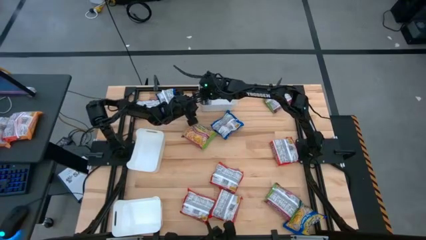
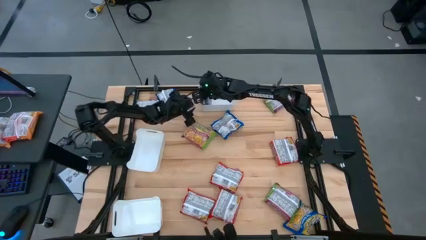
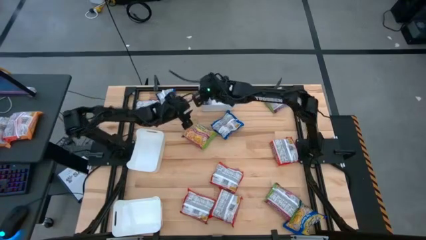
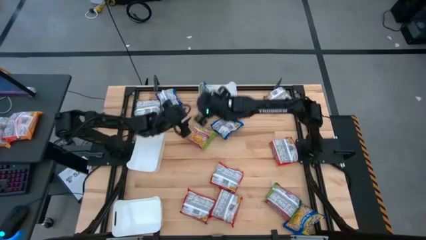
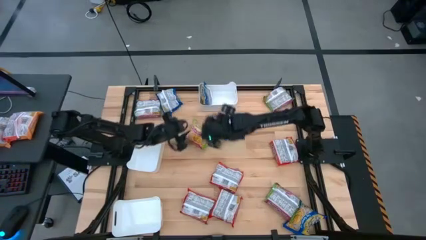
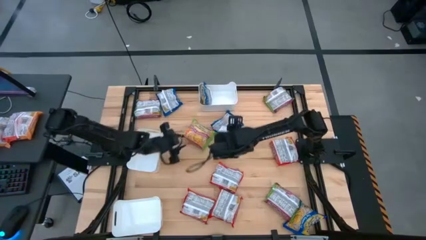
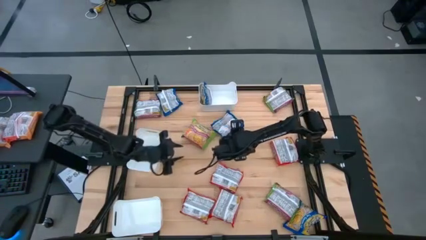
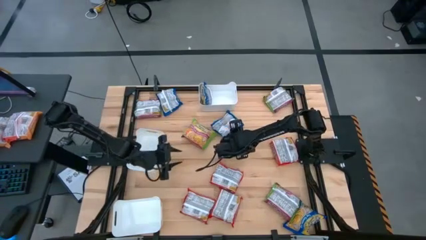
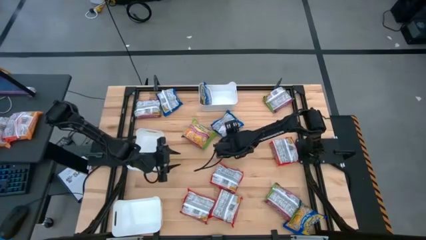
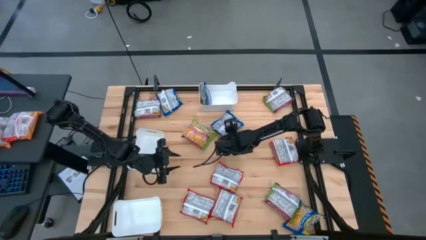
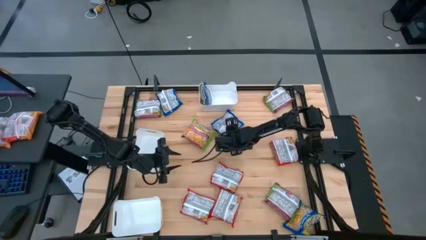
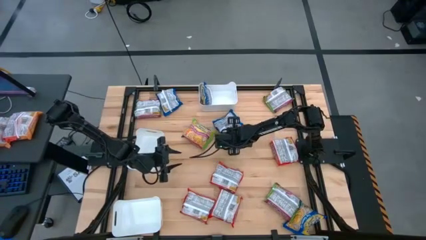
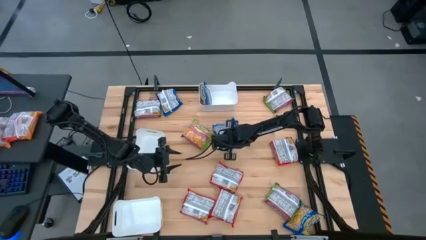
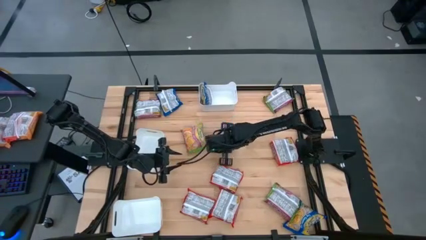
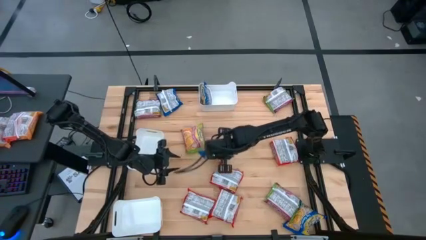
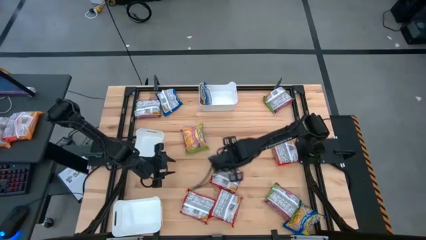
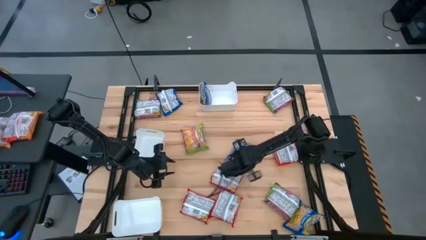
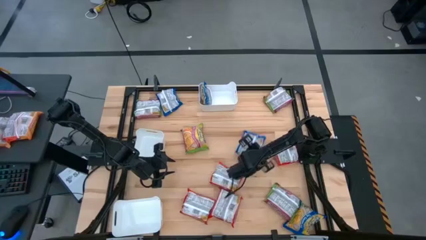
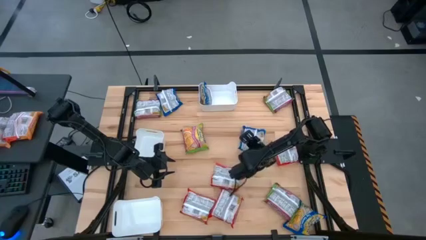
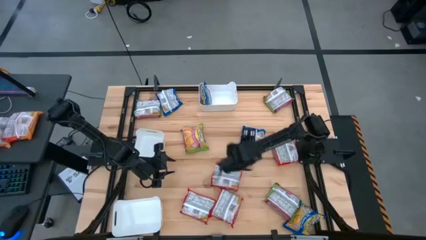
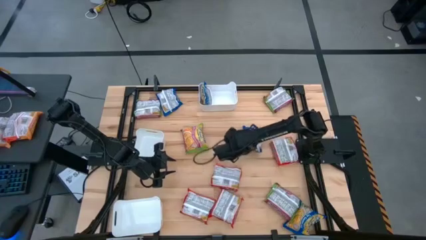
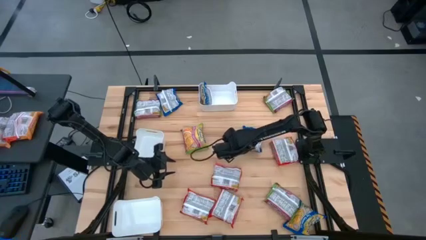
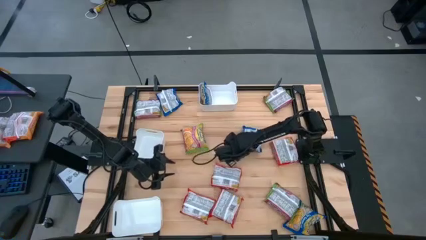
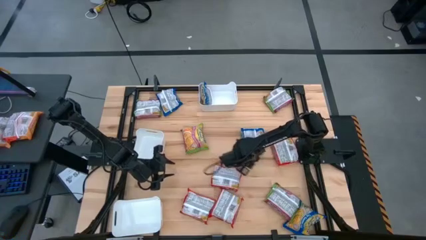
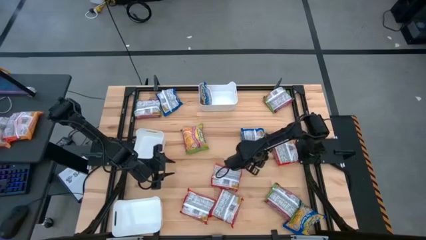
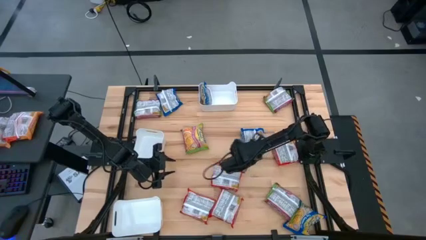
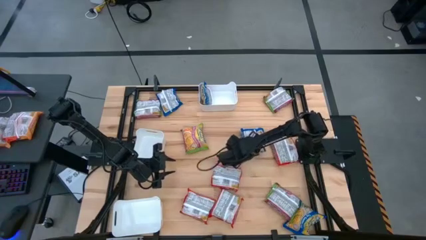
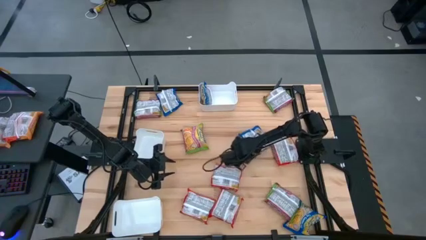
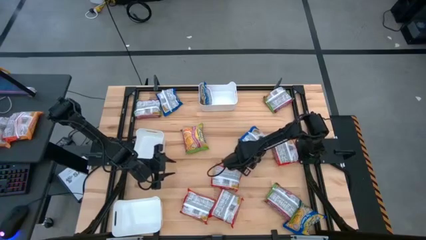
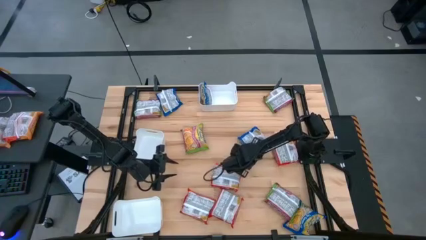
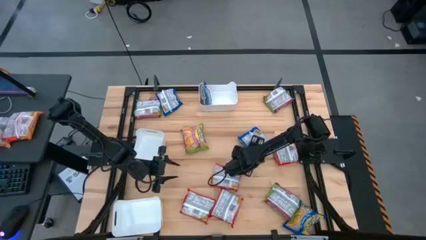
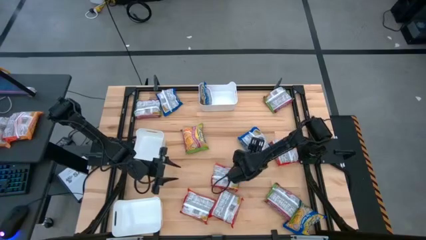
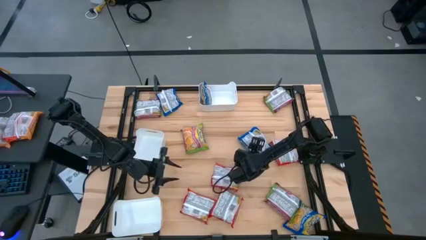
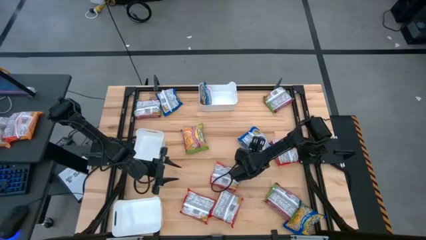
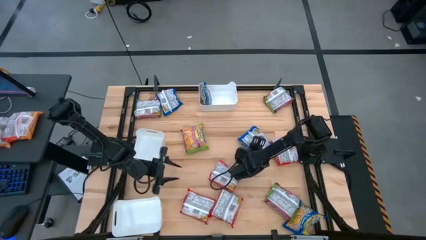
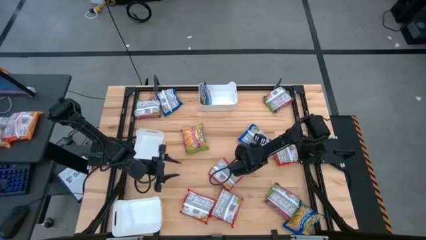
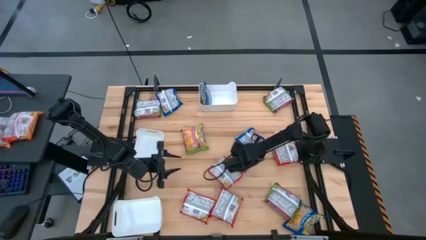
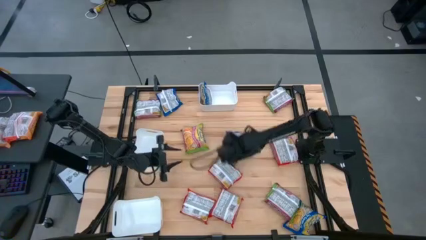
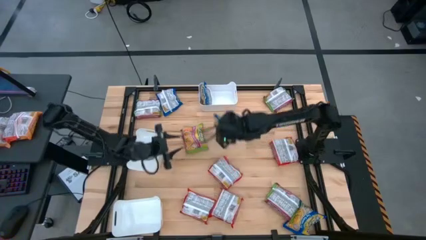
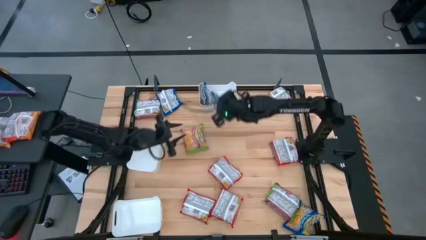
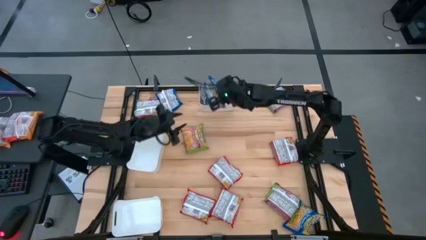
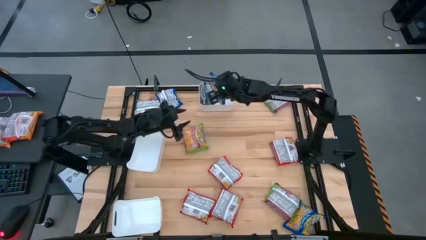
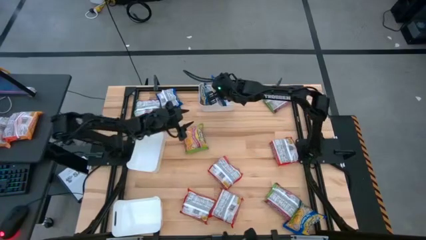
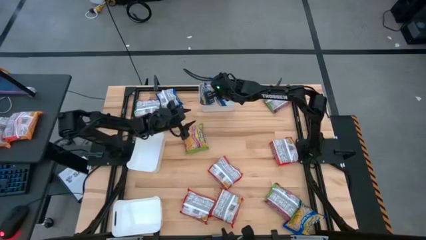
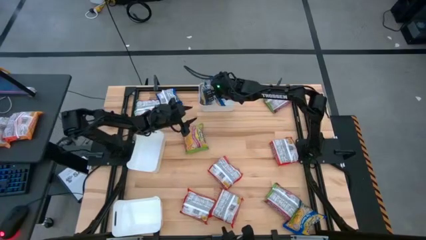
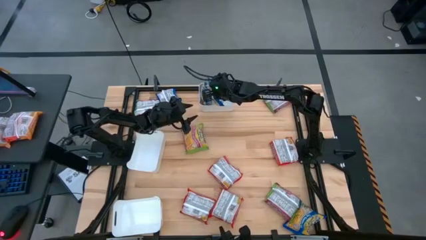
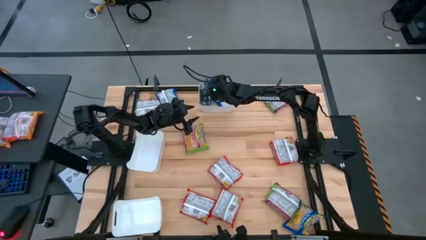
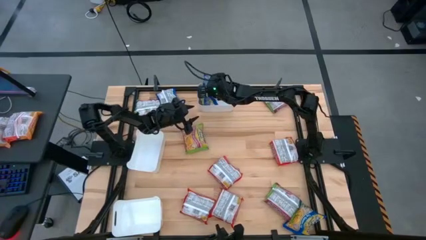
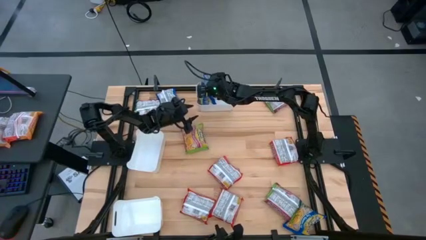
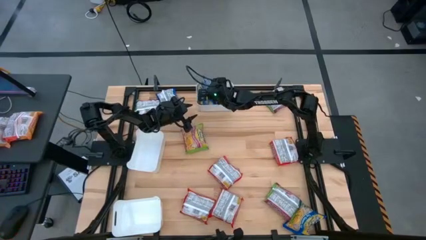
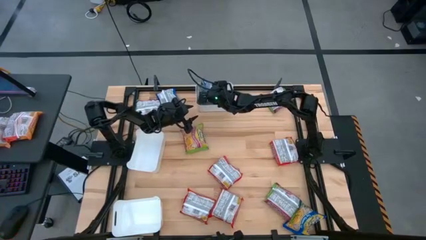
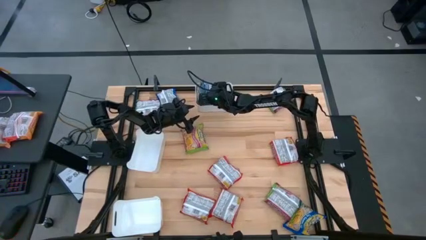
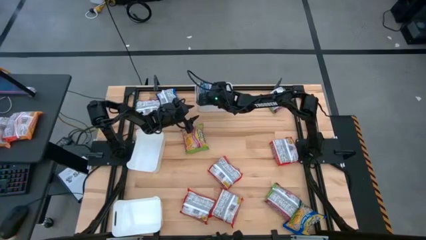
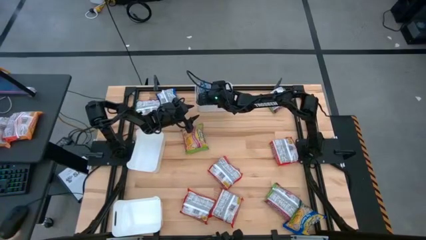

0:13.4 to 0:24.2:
Task: Sort Maruchan noodles
Put the blue noodle pack into the top white bin

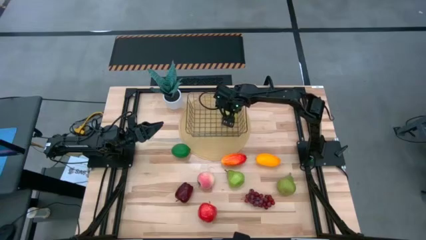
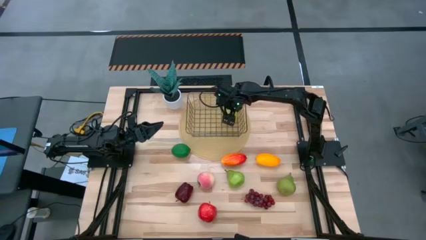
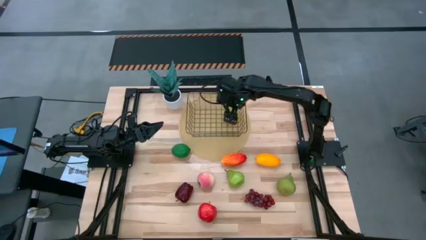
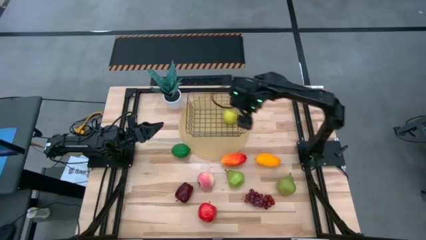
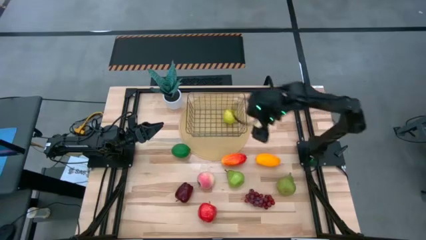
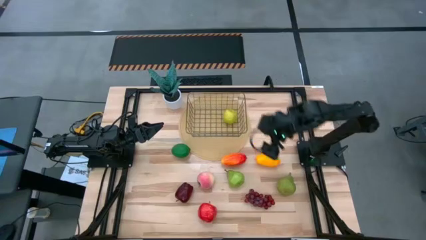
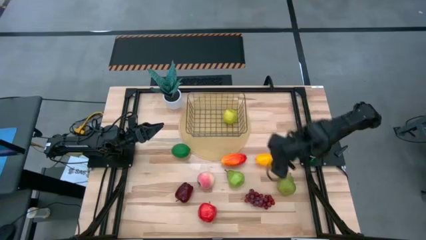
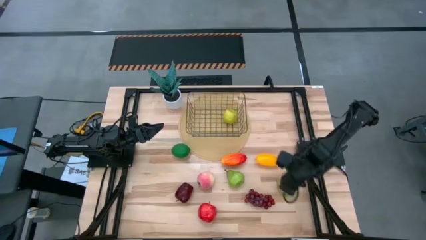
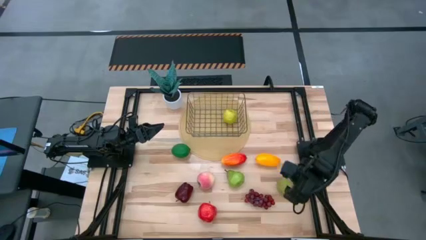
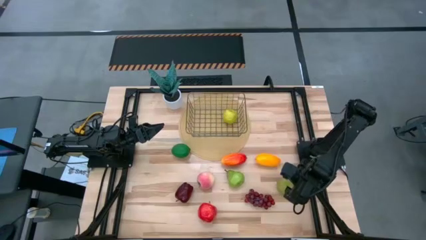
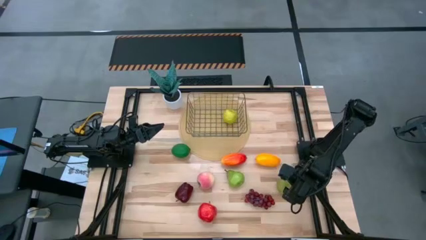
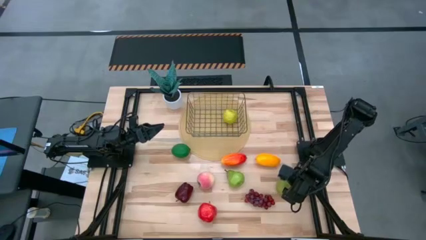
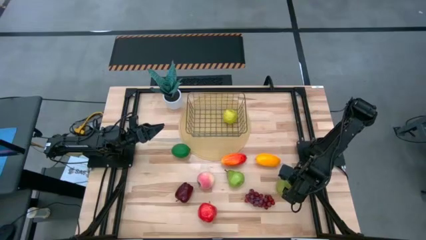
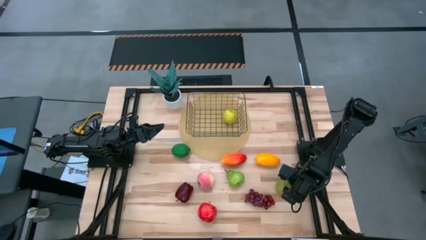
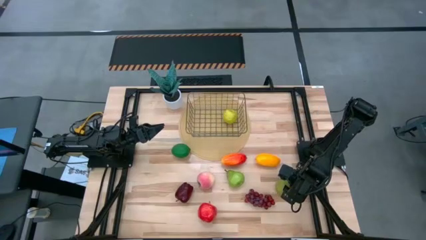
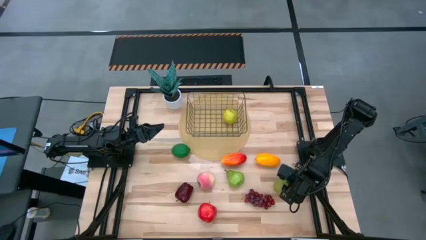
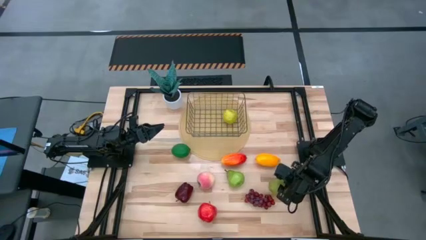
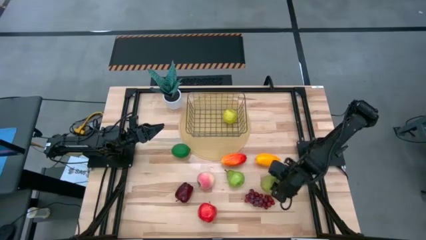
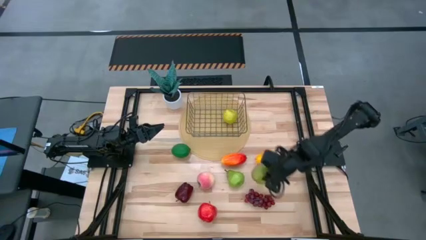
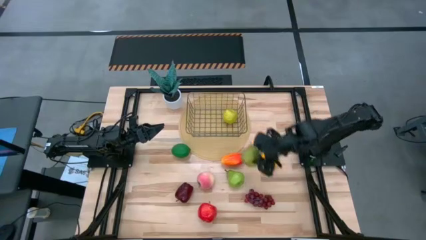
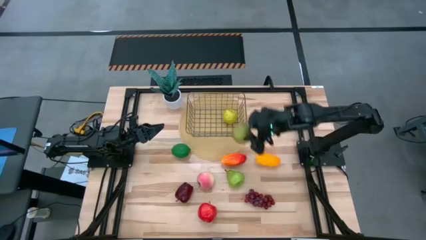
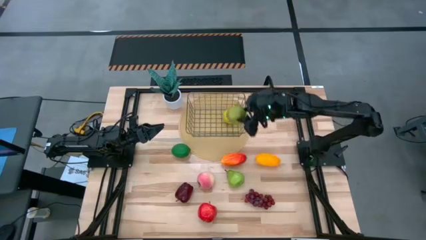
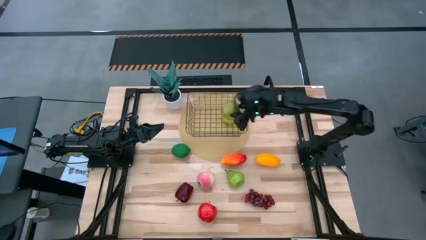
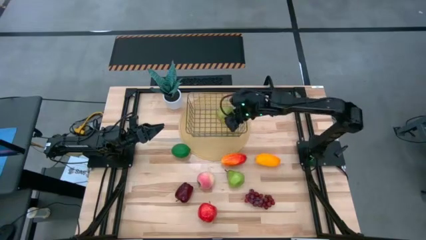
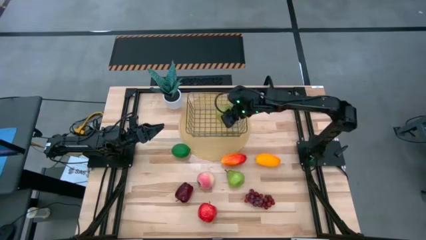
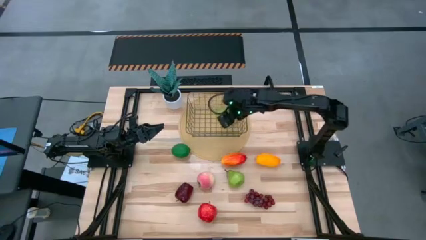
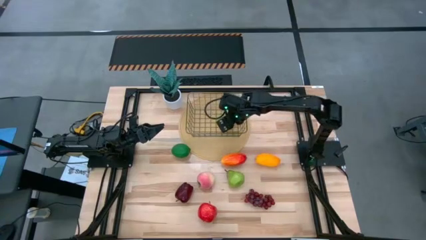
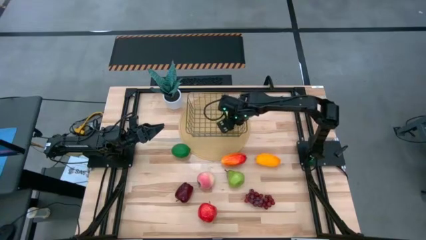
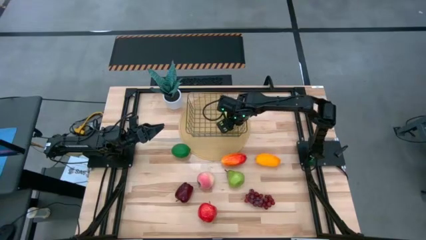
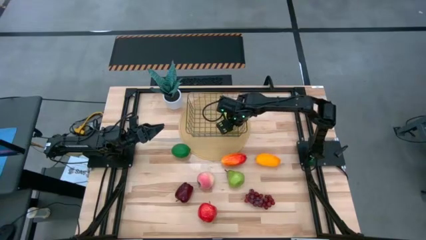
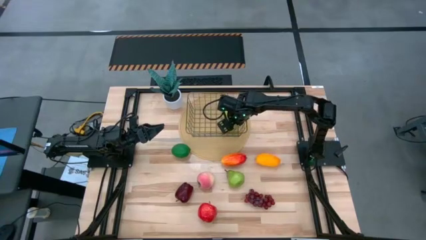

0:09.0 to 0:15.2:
Task: Build produce basket
Put the right green pear into the wire basket
